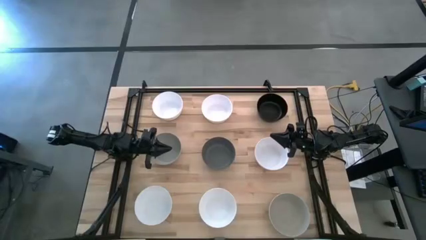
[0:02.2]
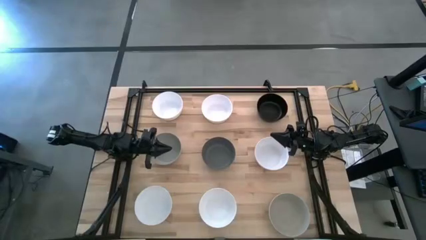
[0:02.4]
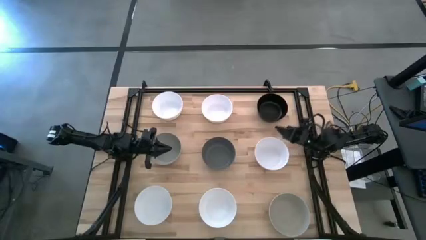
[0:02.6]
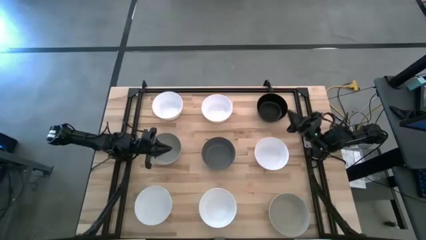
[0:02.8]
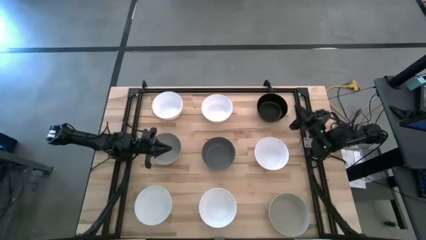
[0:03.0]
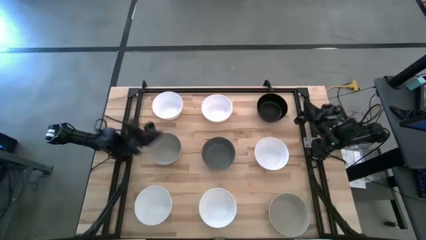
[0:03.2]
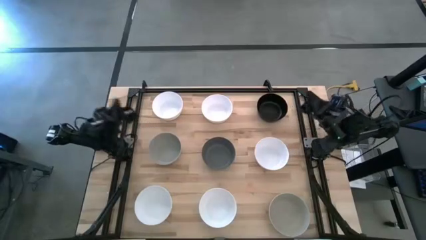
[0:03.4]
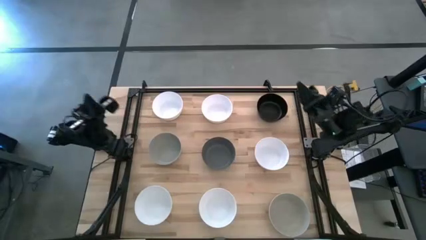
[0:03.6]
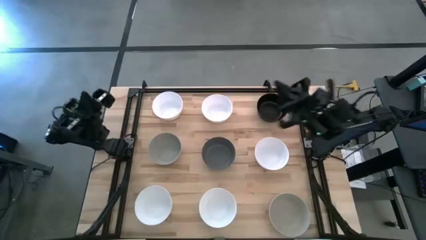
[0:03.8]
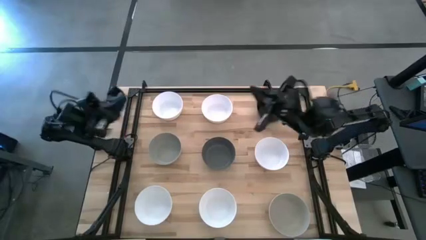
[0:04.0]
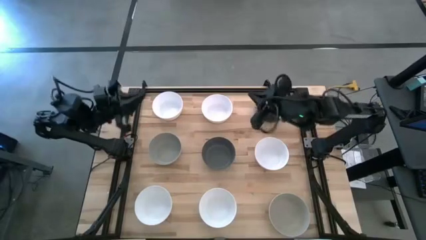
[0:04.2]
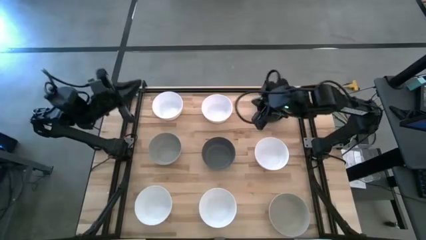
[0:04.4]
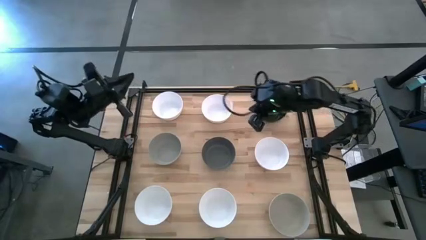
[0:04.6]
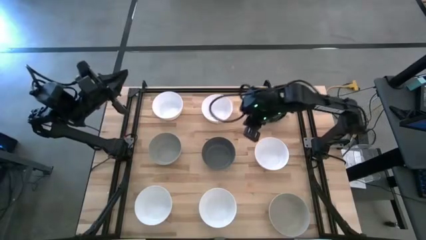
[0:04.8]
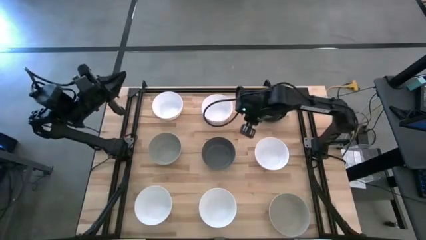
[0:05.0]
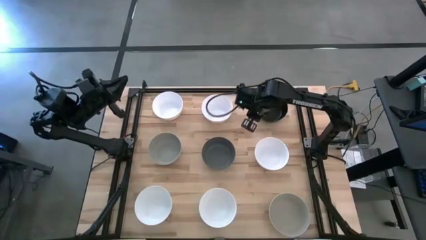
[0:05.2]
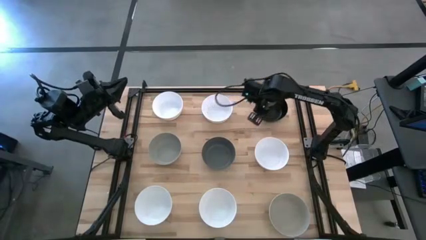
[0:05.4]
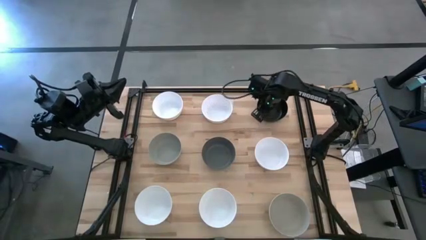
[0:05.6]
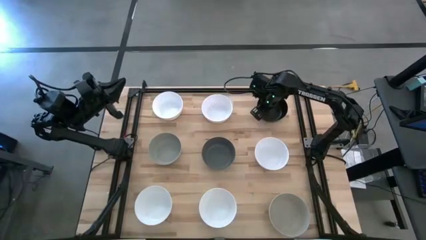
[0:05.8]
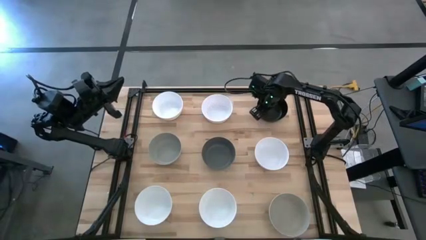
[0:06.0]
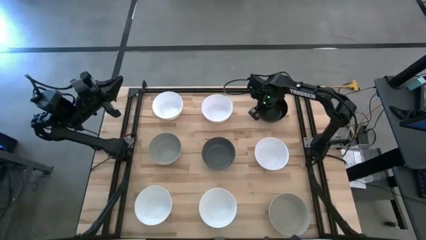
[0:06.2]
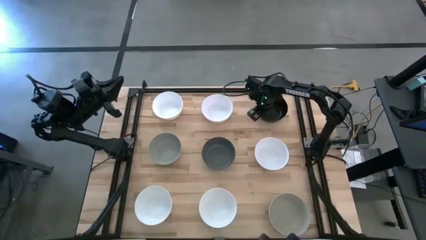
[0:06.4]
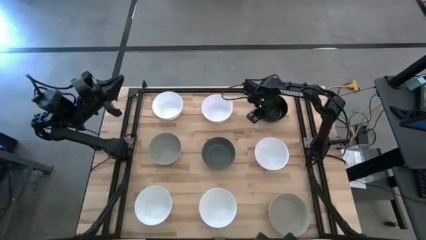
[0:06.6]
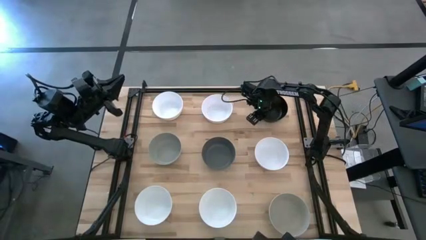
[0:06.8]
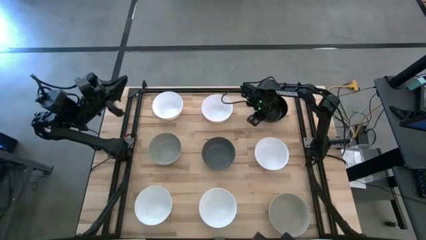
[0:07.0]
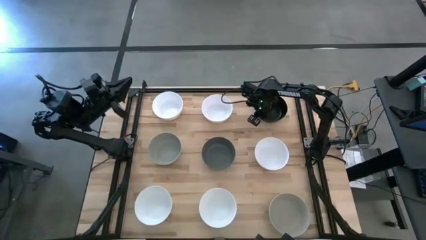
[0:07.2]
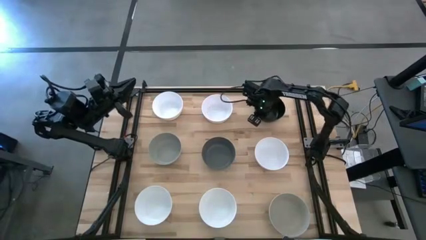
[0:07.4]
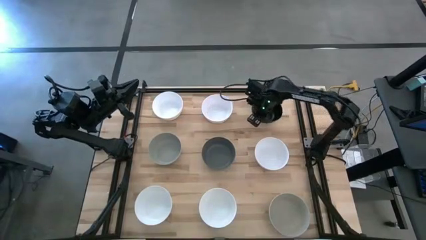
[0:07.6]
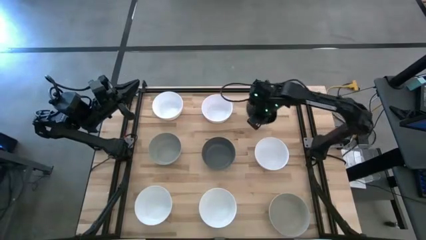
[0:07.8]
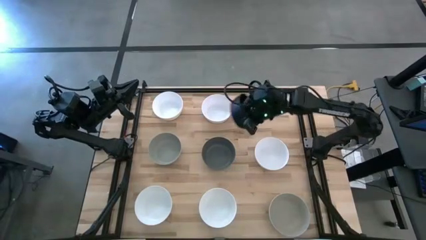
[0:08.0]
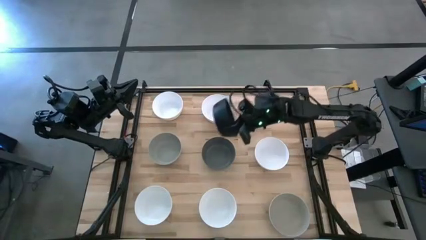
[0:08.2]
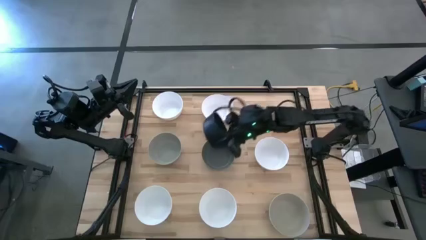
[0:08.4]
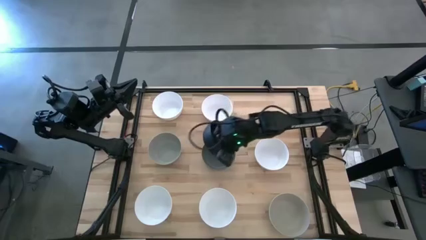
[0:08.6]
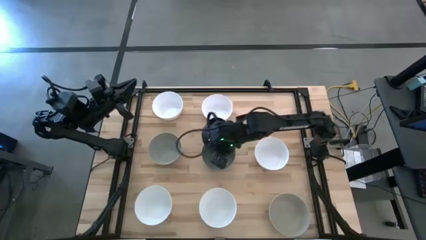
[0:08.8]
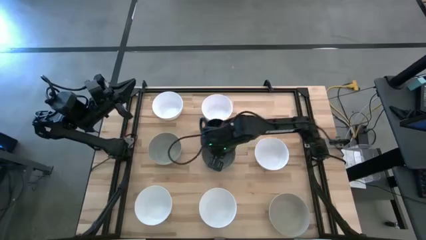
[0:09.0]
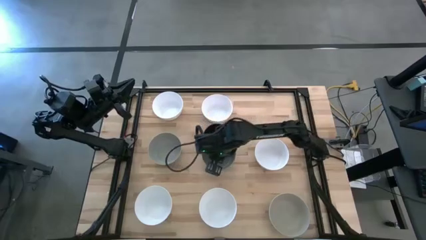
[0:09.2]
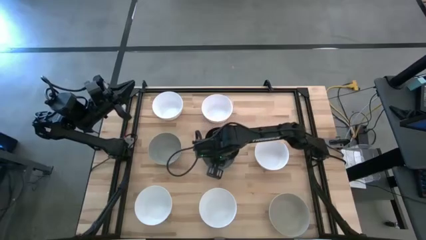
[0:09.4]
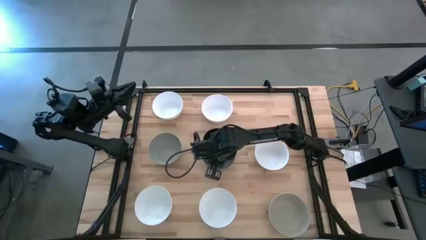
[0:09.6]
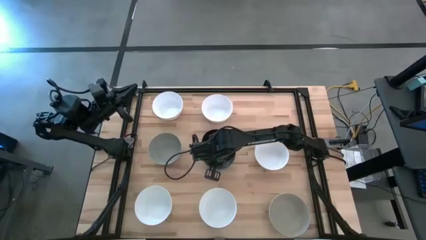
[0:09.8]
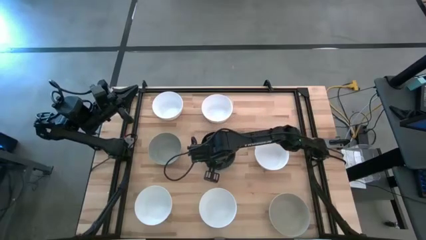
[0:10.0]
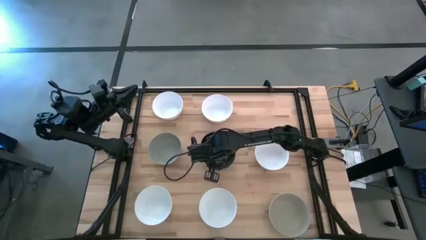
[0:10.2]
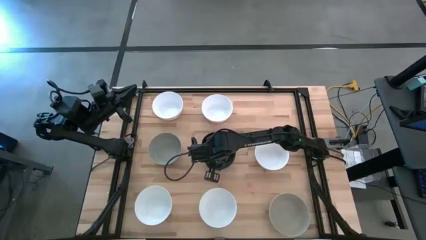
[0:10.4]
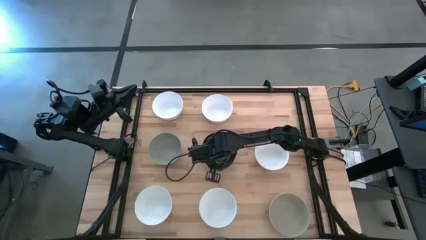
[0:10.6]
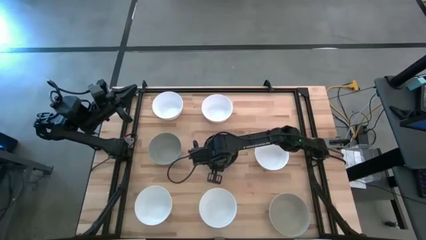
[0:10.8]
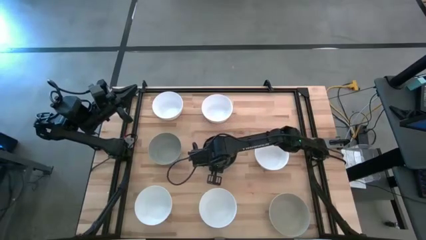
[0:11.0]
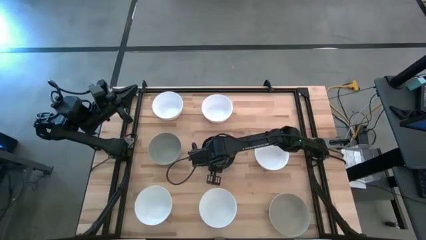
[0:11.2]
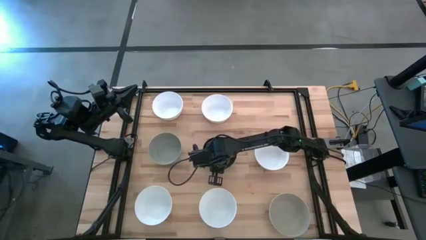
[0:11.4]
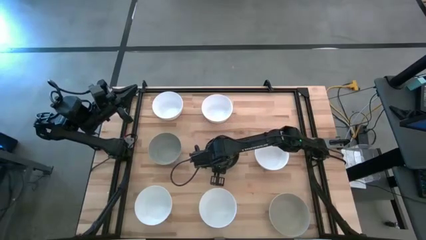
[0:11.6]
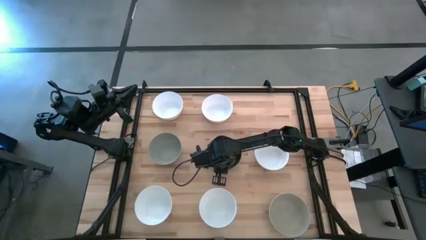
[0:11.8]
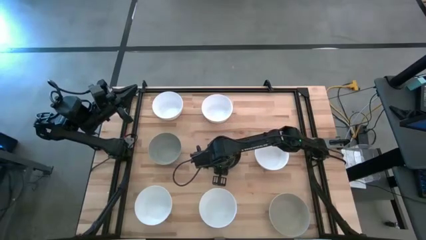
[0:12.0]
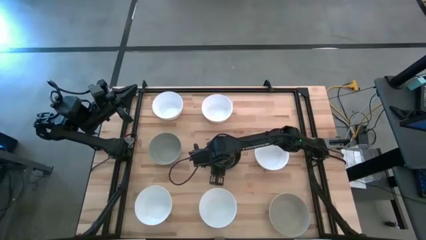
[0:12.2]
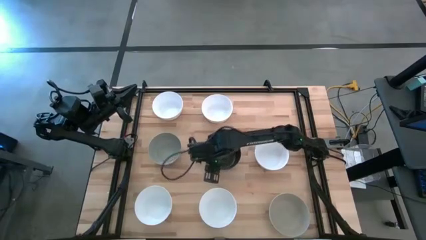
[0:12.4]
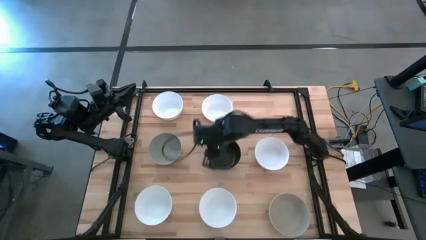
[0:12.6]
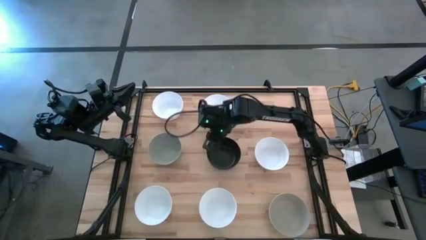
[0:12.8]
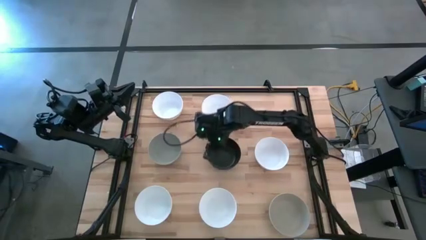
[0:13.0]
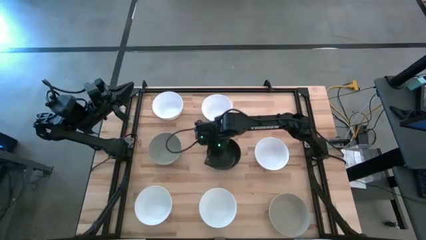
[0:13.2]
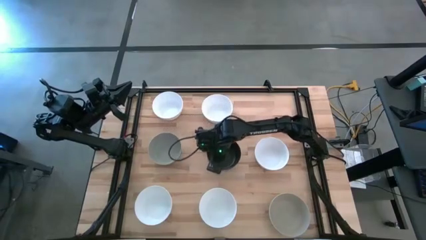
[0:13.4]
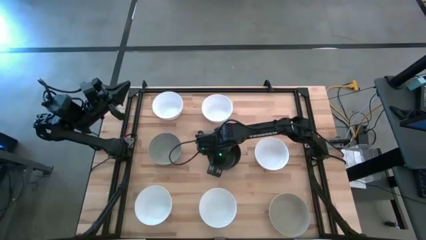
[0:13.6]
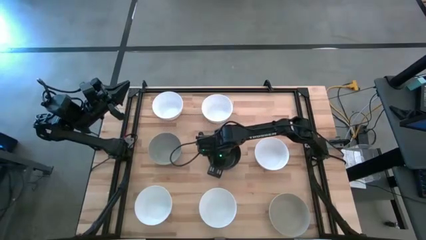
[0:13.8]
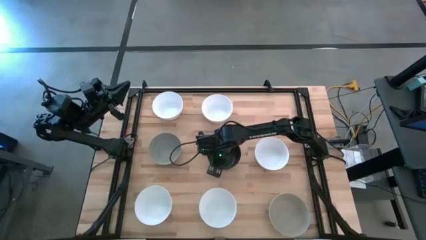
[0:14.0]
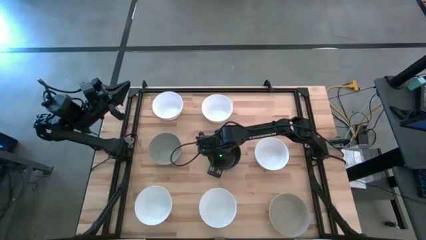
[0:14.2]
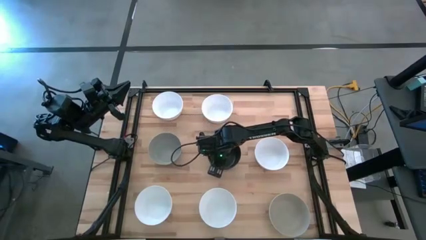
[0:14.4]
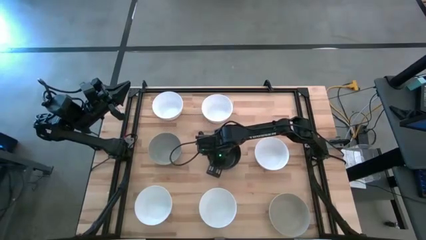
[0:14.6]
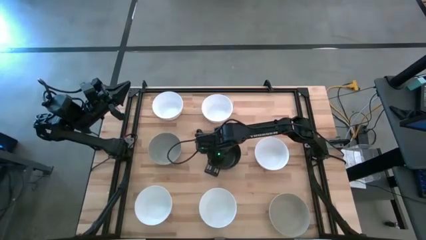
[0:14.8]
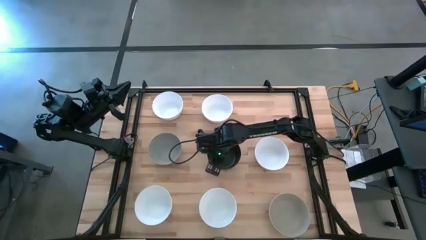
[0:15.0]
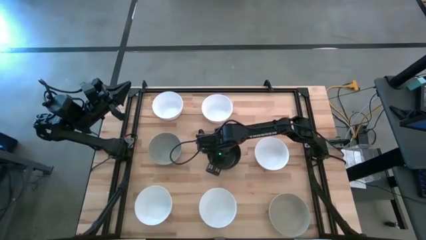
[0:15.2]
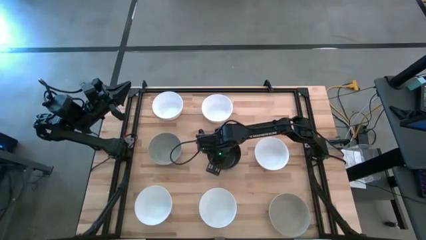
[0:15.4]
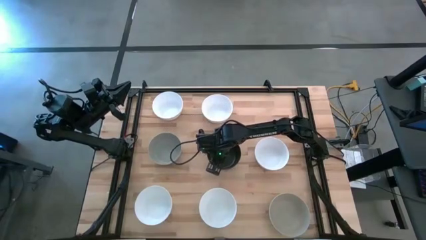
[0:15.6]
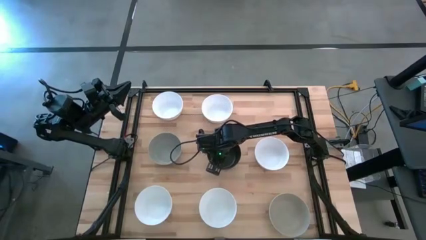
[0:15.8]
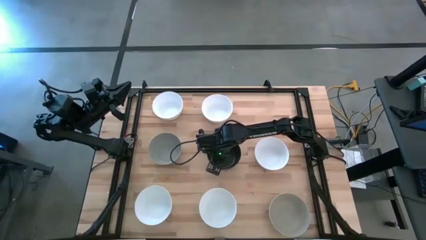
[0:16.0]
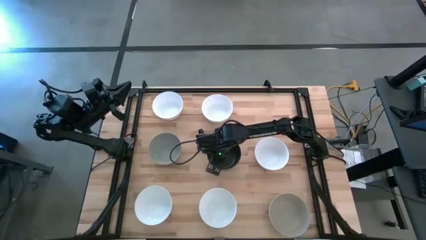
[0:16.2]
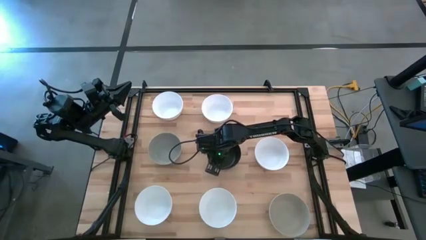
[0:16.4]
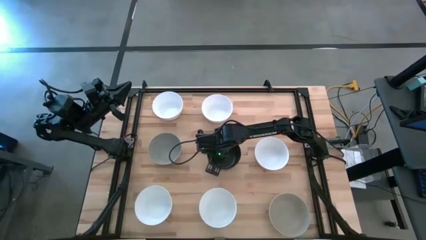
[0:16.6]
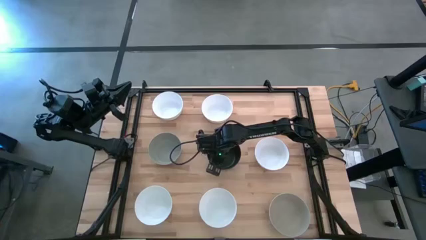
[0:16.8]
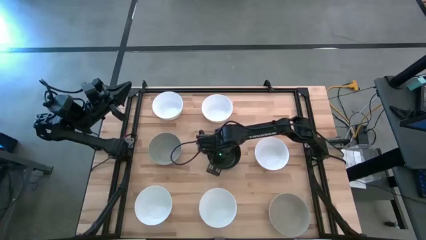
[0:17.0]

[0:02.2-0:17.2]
Task: Nest bowls inside each other
Stack the black bowl on the gray bowl

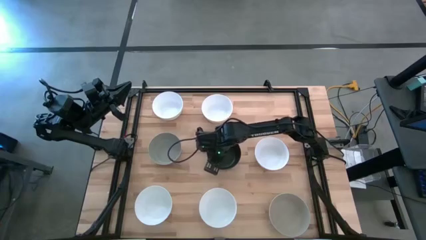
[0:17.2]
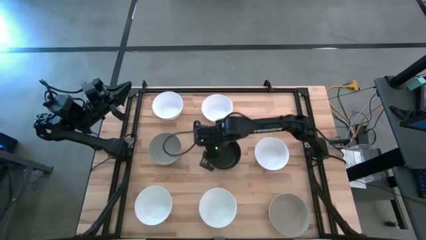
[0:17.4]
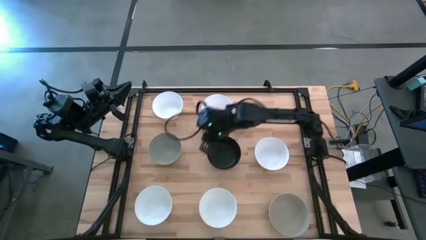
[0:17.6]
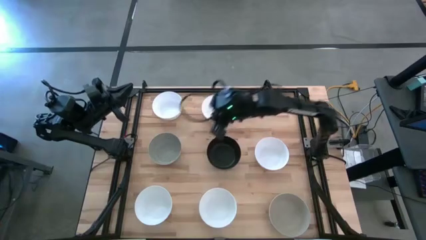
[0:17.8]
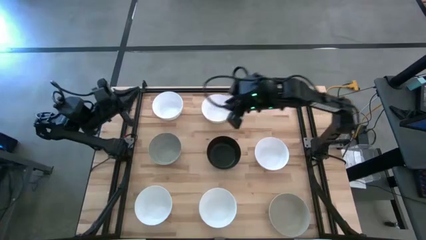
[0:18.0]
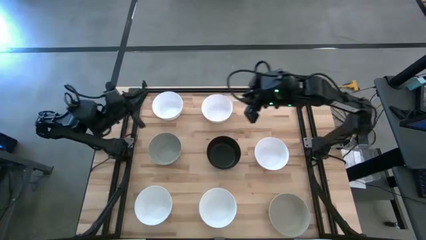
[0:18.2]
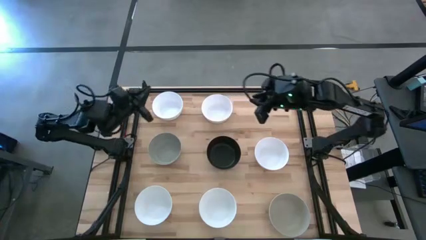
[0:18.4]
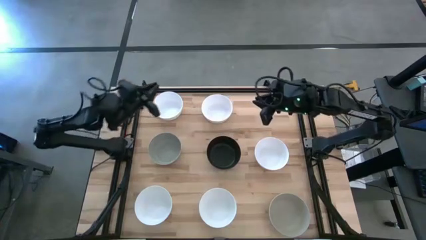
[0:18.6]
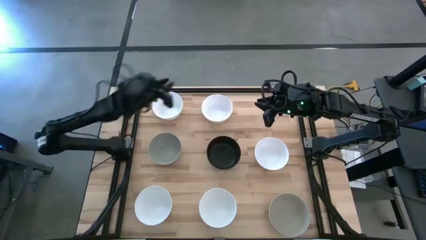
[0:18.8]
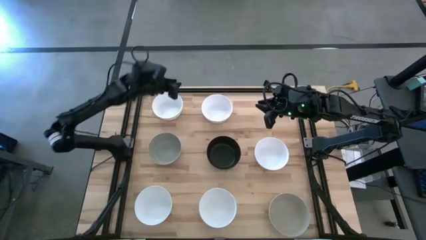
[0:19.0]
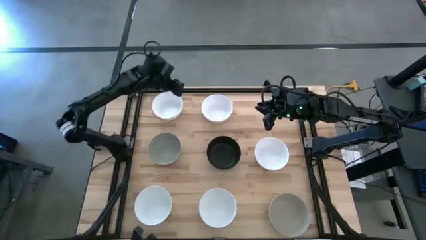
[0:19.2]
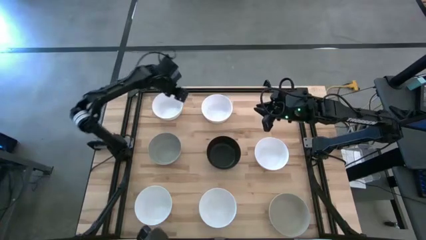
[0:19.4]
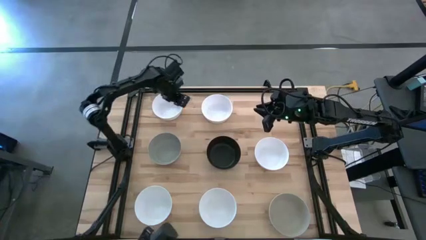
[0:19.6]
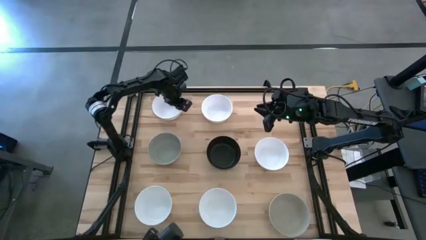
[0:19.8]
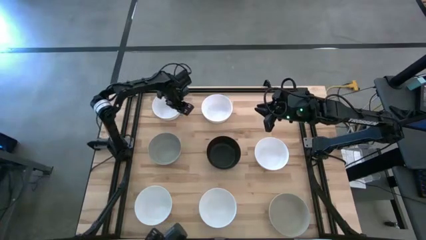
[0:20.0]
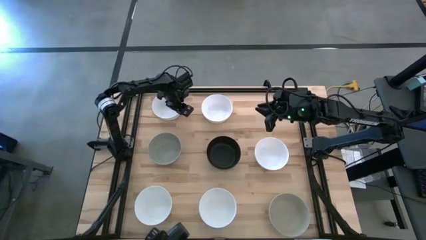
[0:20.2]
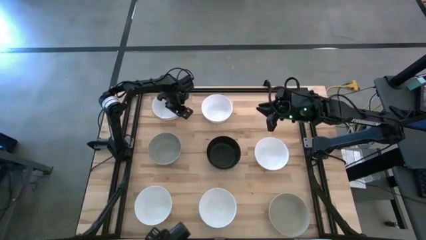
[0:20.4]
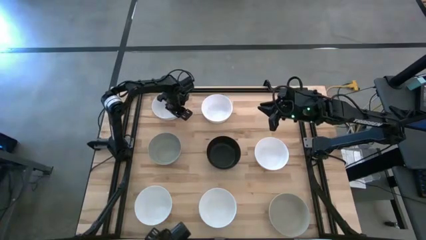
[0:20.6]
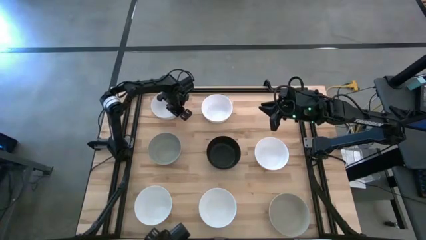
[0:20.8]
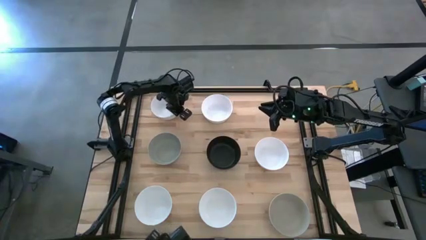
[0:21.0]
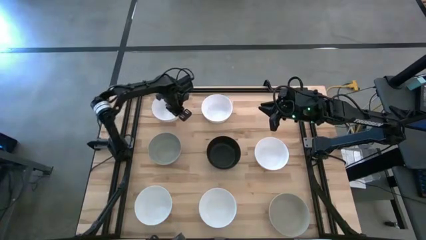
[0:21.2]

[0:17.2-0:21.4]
Stack the white bowl on the black bowl
